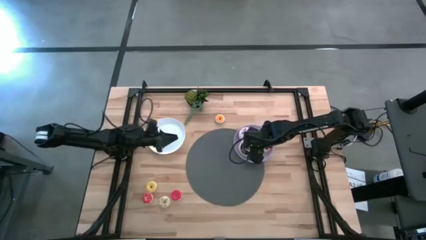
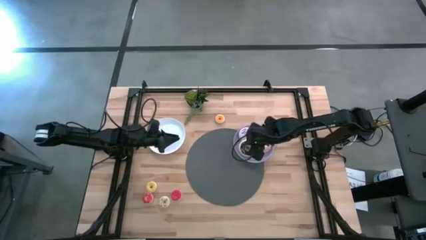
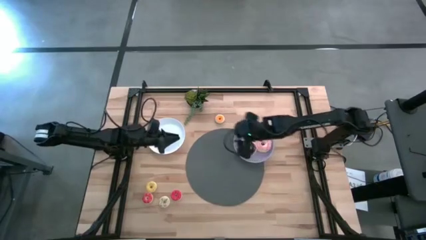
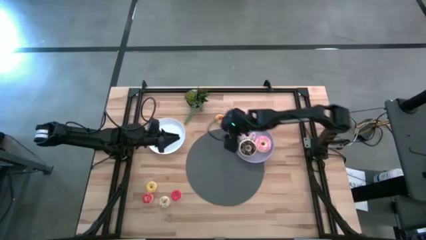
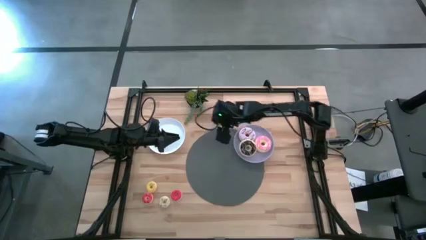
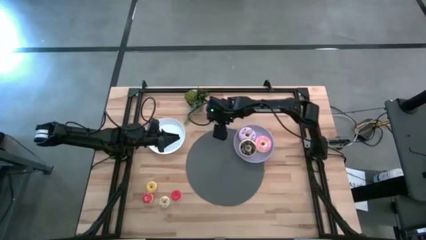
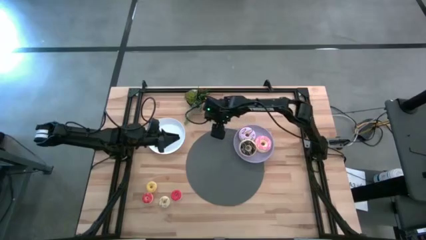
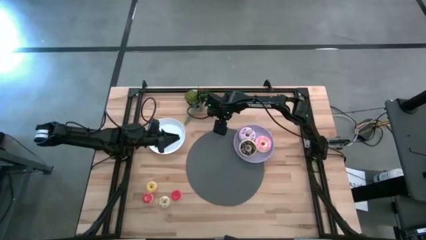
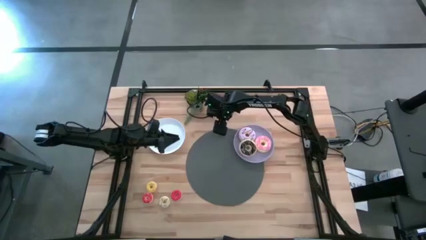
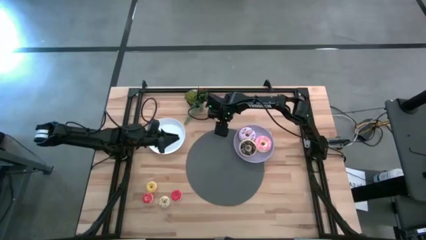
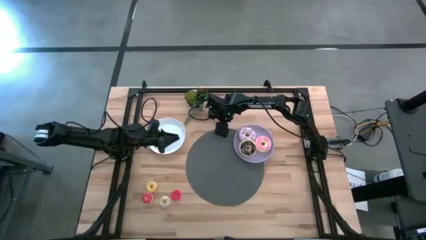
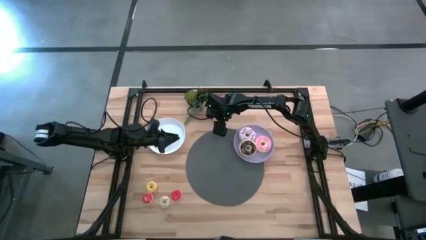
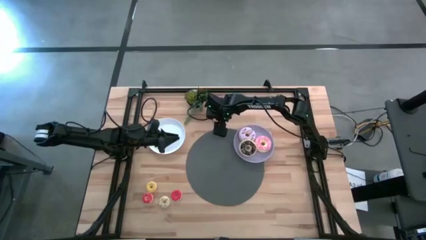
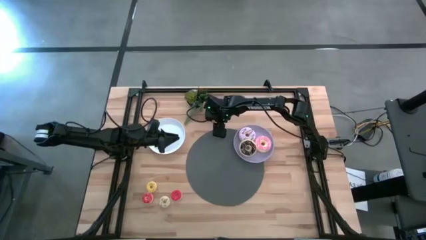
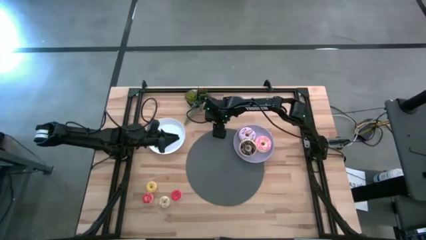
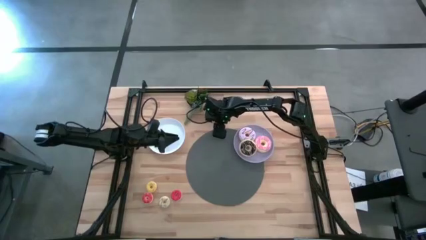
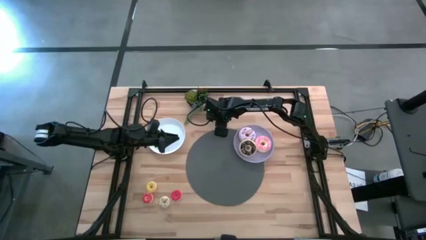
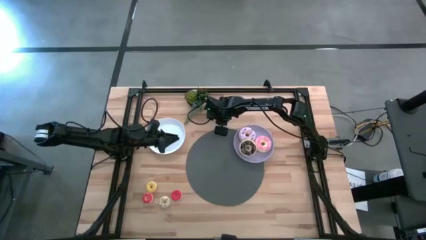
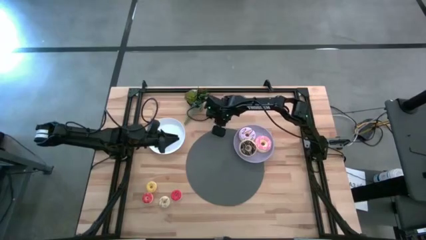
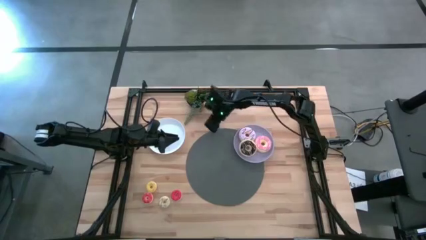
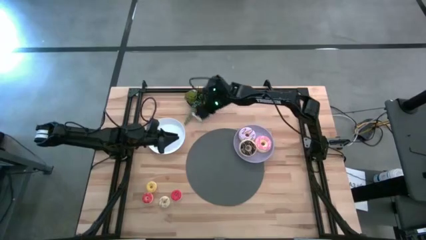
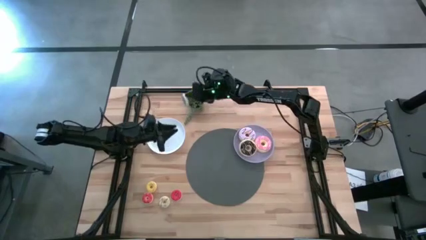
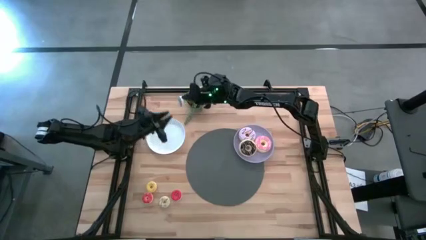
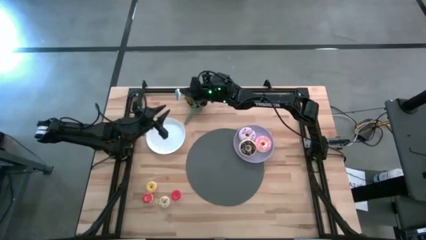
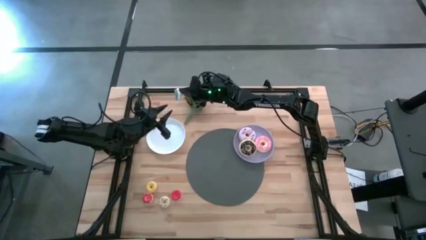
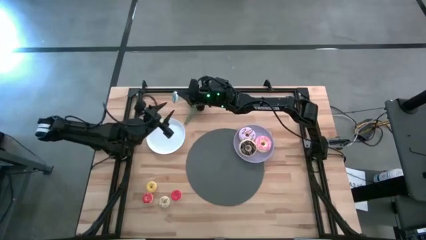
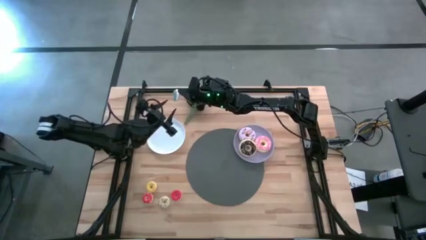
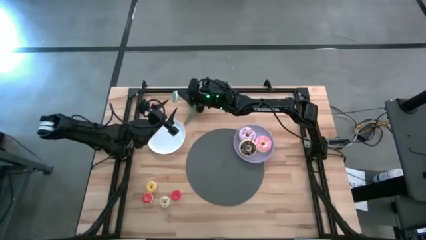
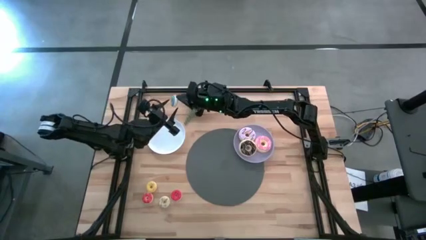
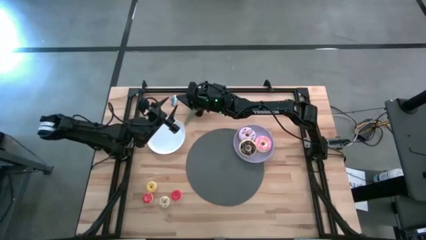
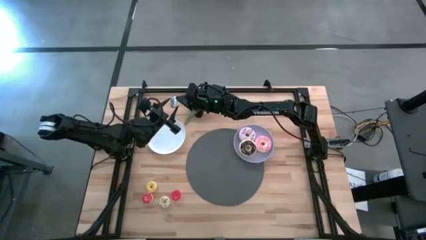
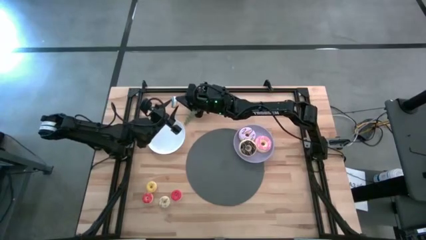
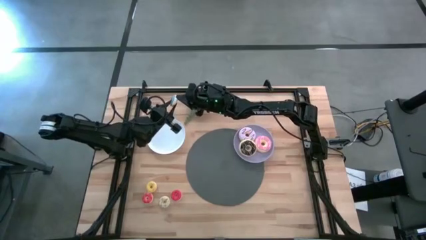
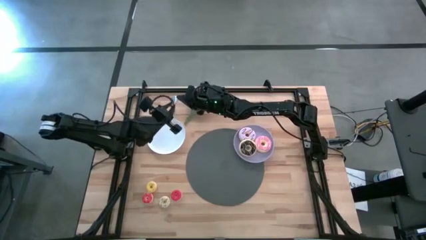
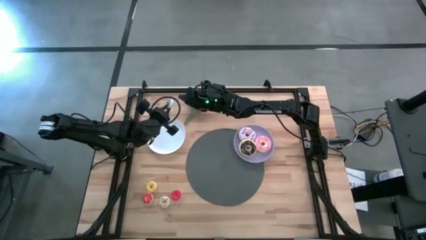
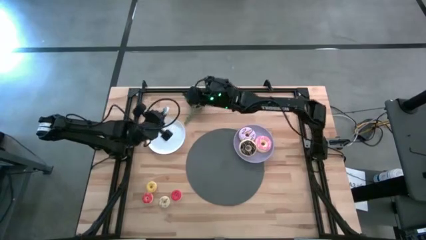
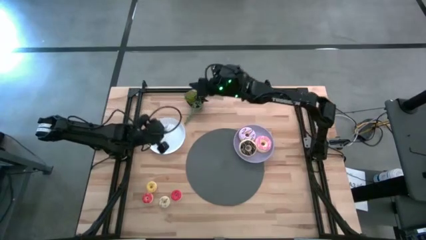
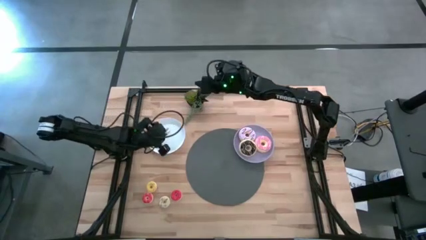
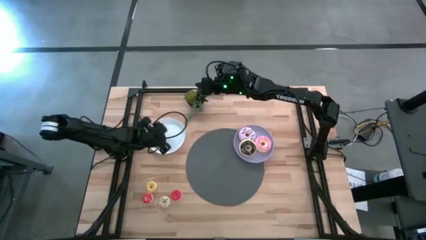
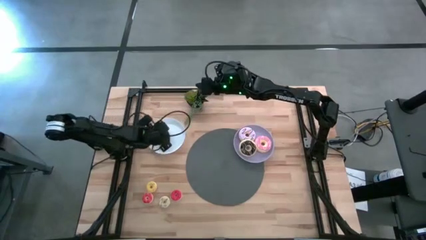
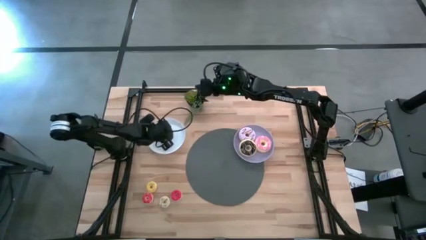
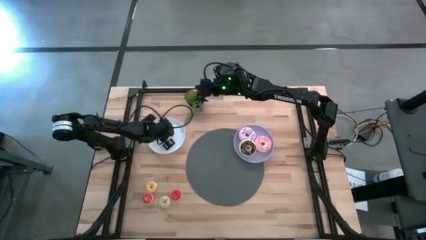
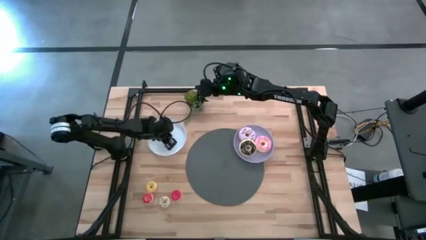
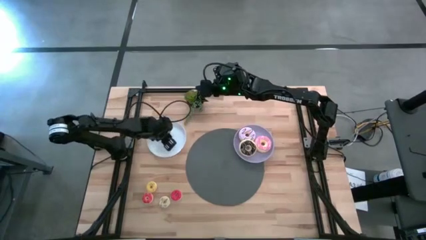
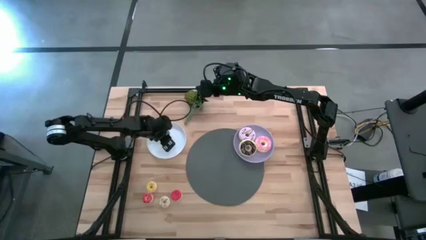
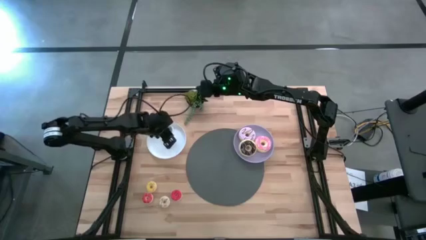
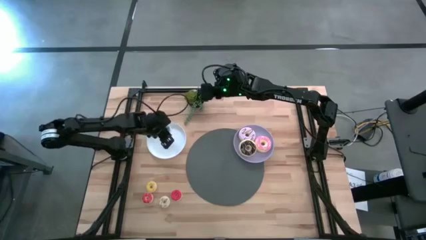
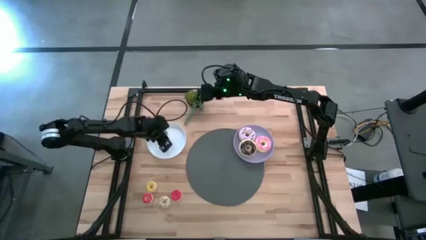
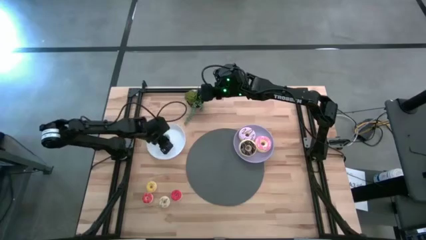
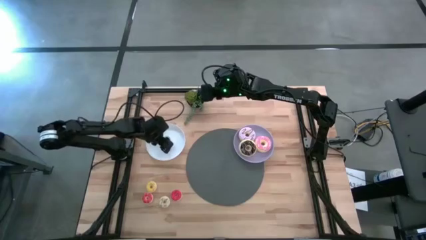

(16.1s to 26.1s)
Task: Pick & Place donuts
Put the small blue donut on the white plate

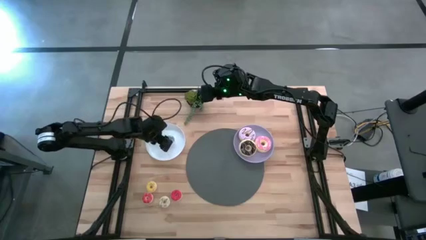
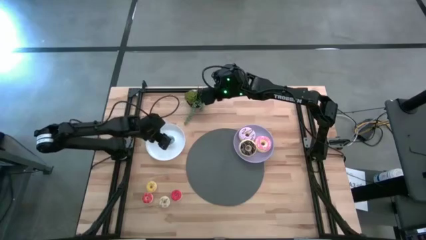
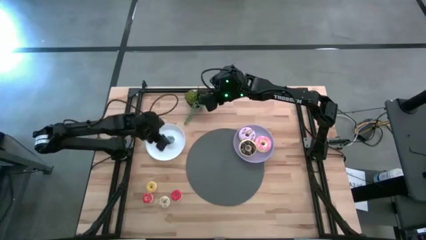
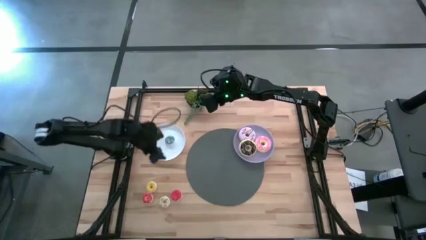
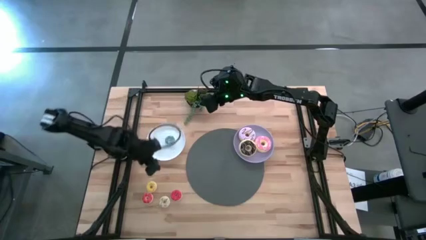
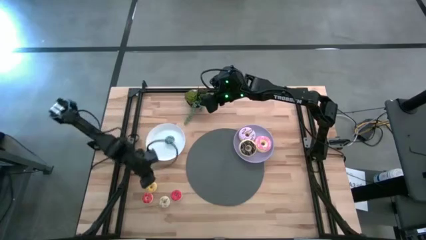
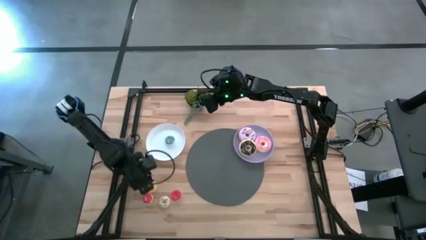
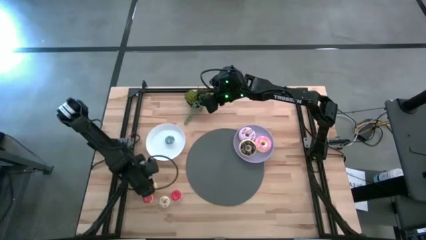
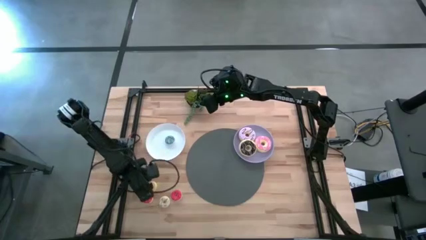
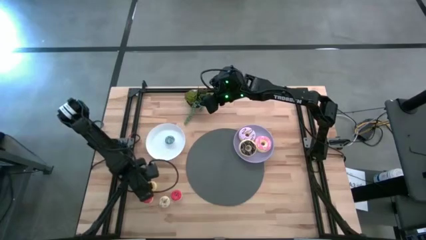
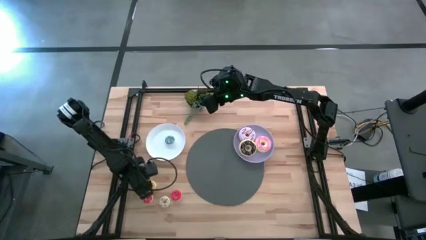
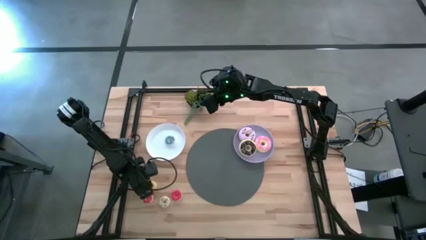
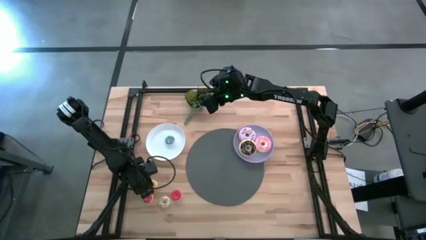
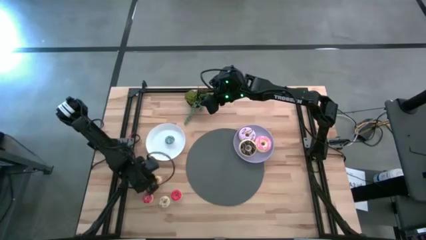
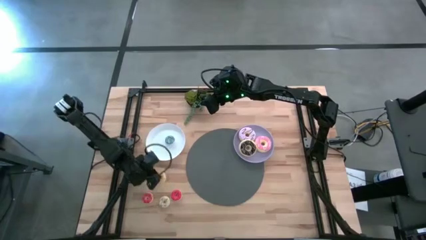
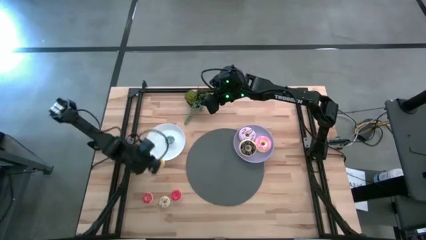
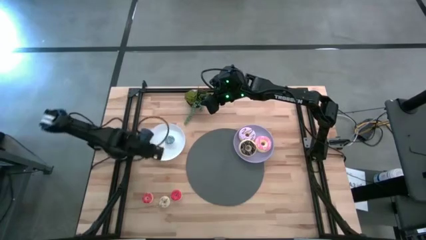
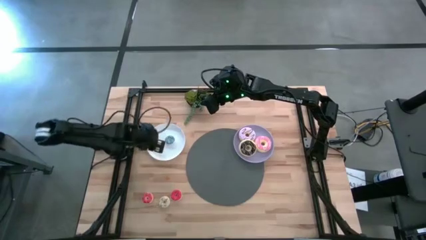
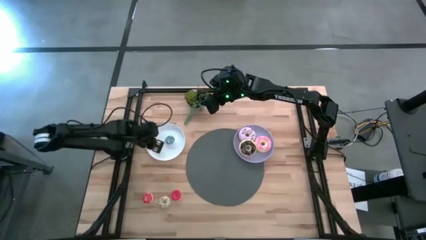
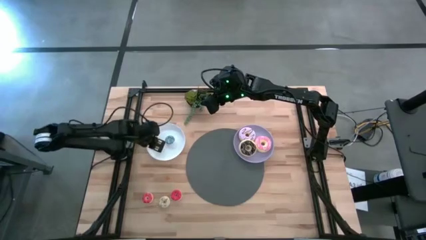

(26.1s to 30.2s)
Put the small yellow donut on the white plate

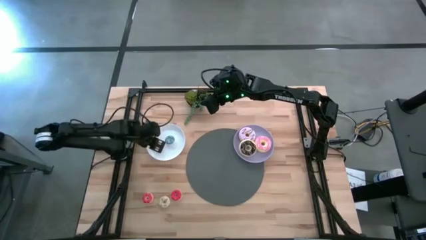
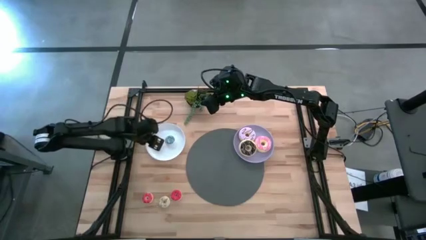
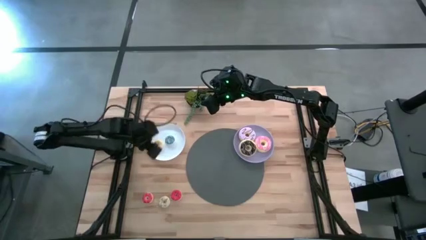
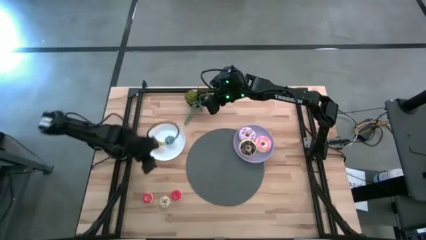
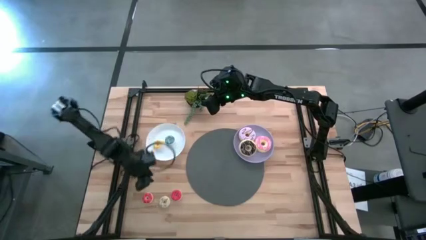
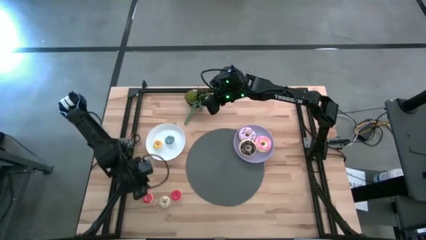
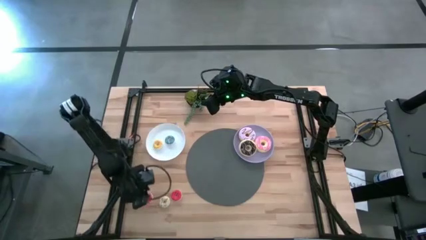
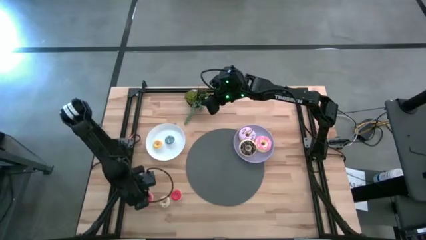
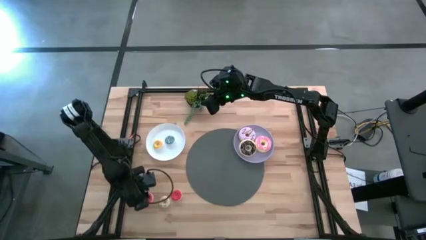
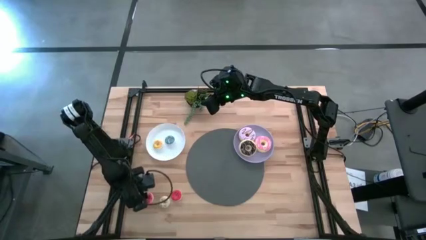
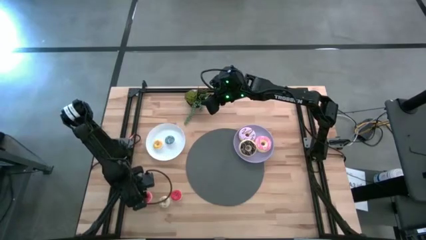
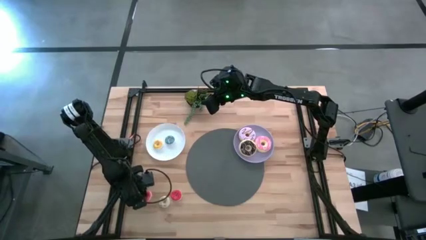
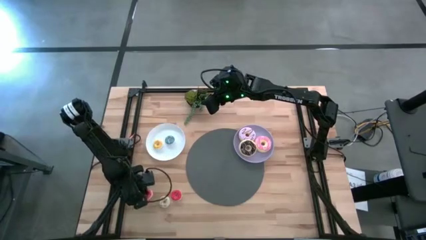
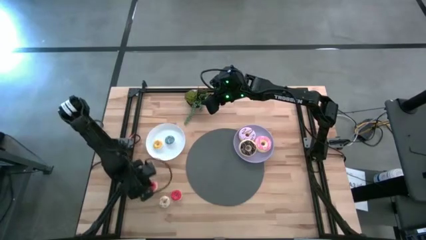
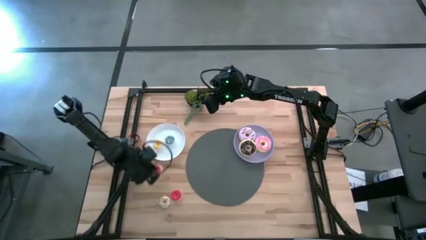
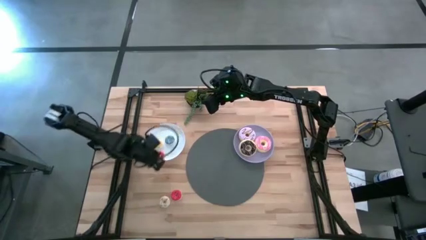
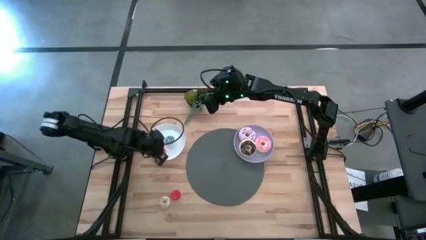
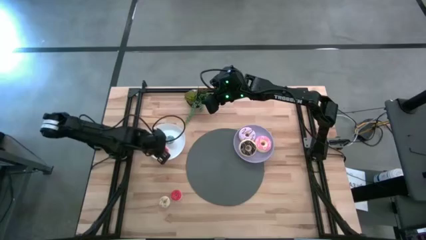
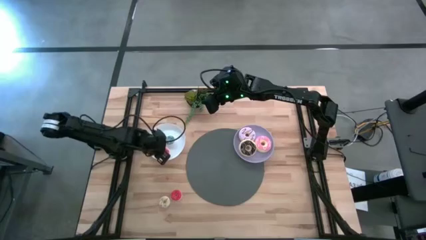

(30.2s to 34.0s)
Put the small orange donut on the white plate
